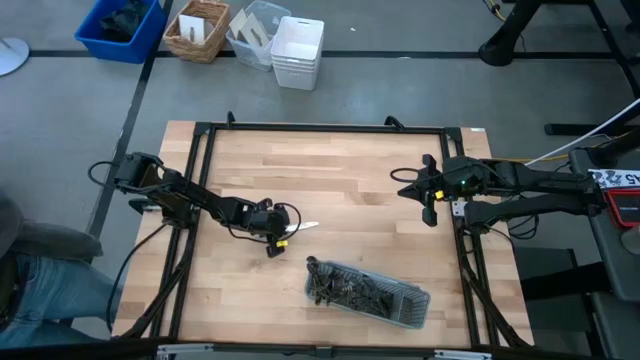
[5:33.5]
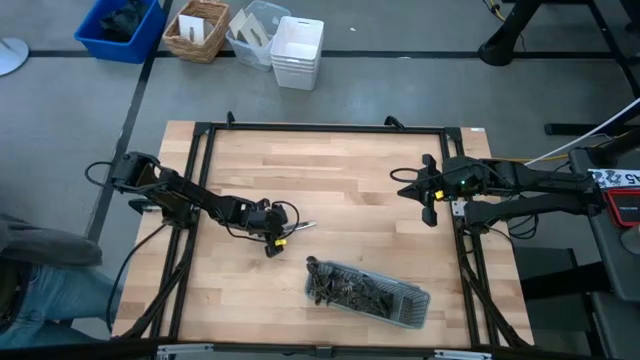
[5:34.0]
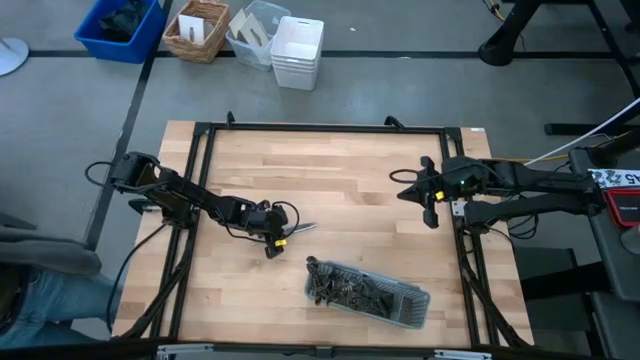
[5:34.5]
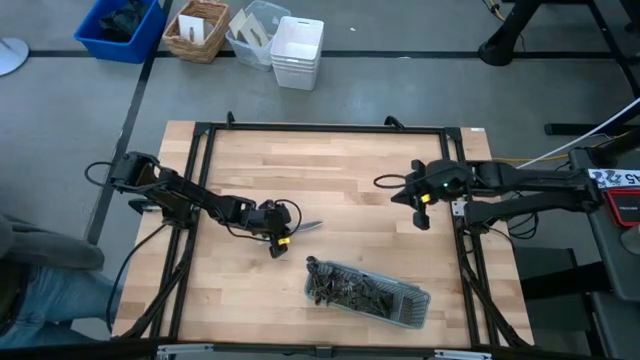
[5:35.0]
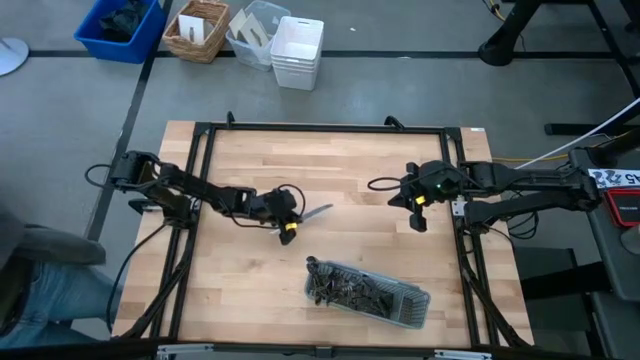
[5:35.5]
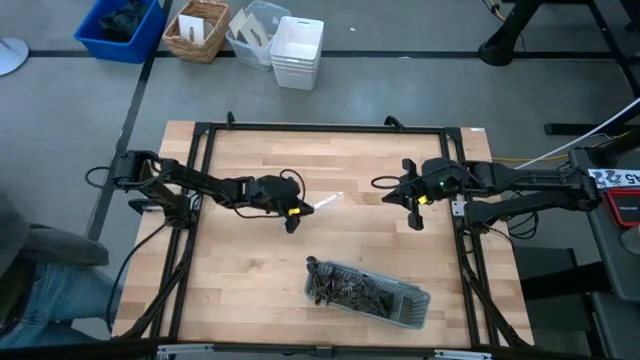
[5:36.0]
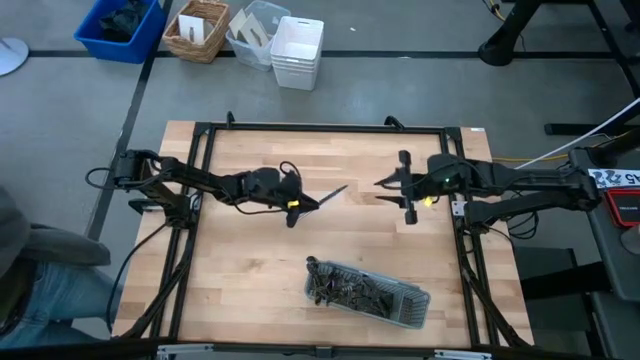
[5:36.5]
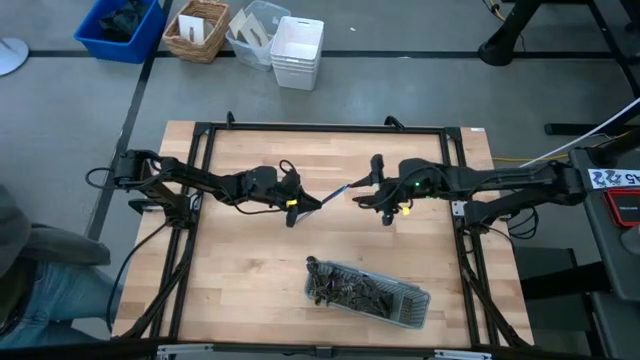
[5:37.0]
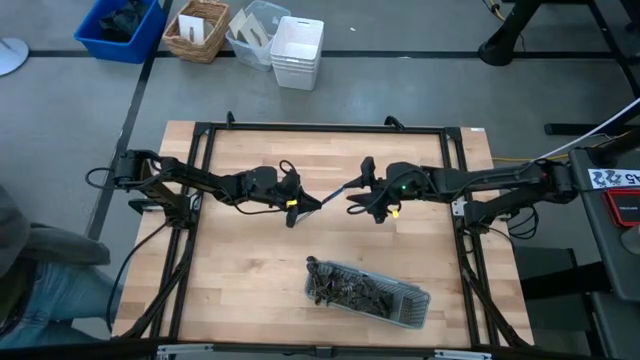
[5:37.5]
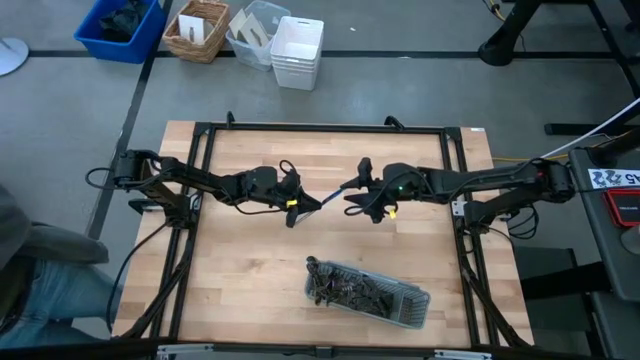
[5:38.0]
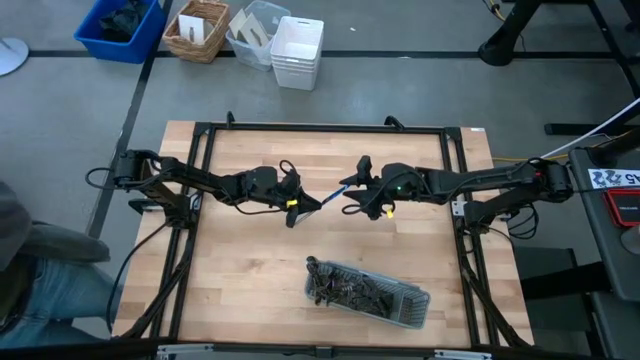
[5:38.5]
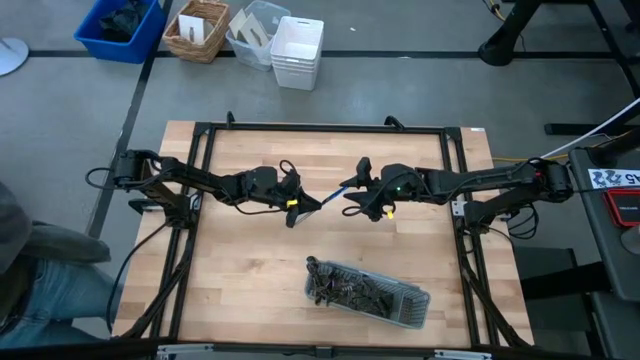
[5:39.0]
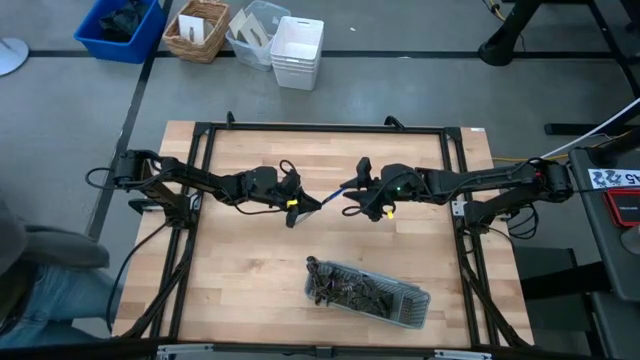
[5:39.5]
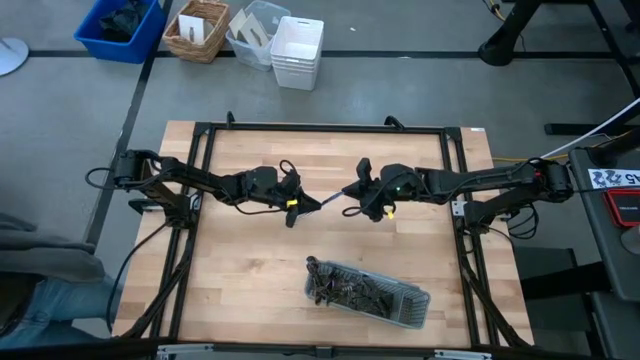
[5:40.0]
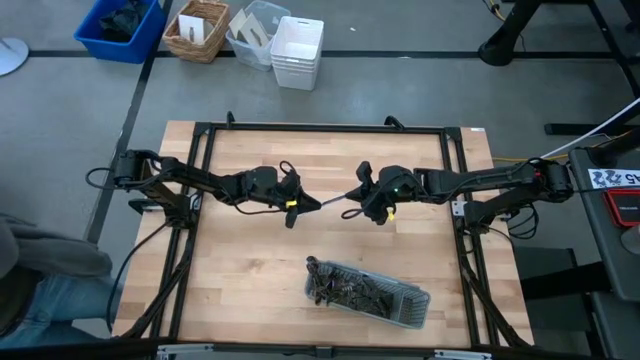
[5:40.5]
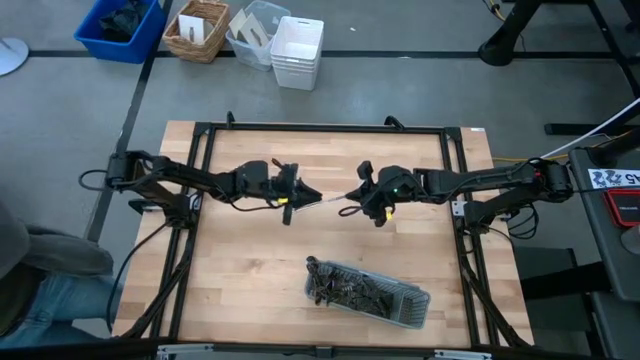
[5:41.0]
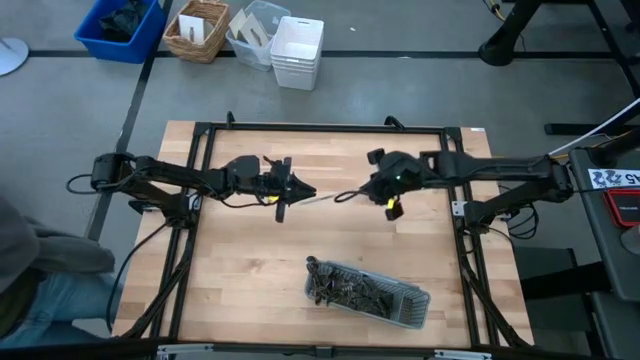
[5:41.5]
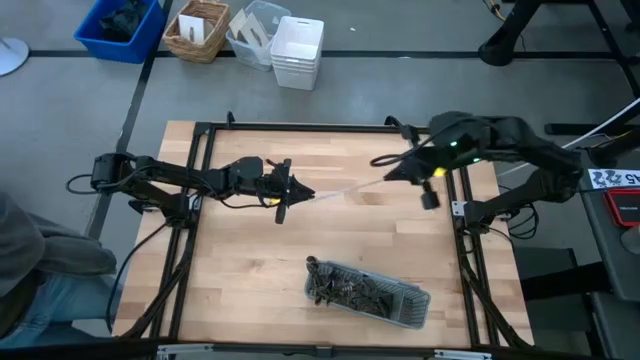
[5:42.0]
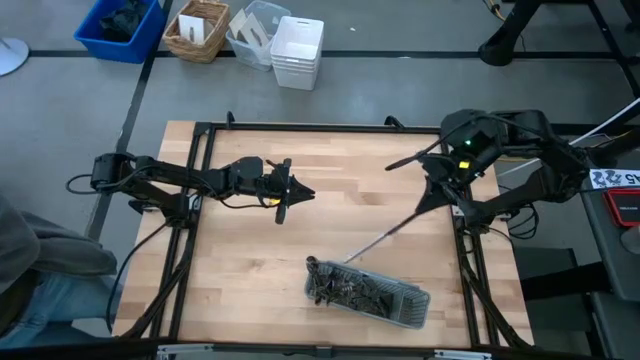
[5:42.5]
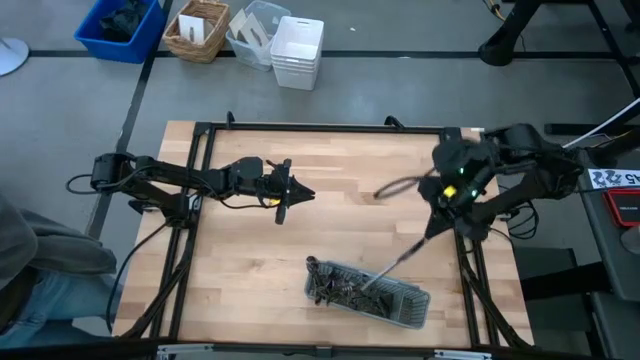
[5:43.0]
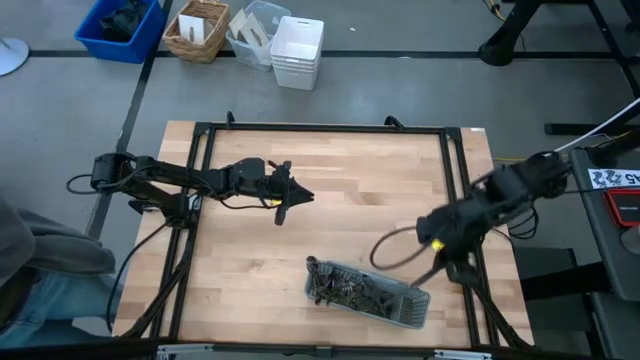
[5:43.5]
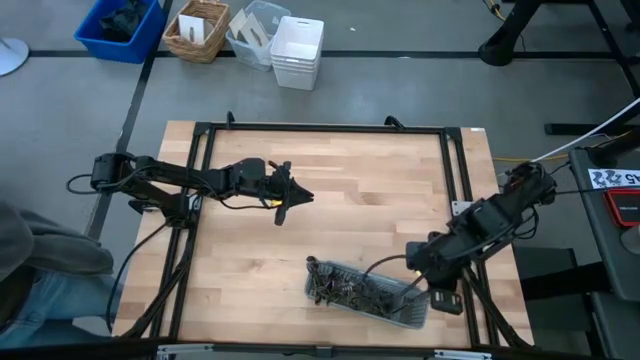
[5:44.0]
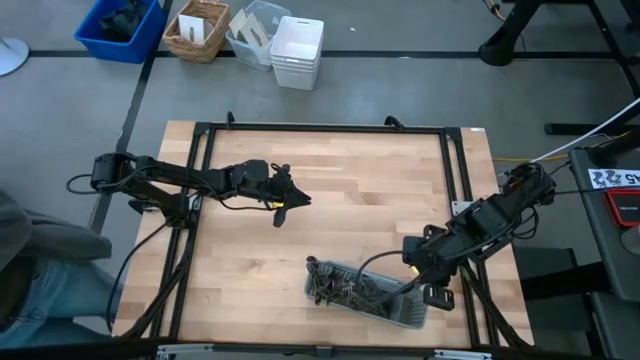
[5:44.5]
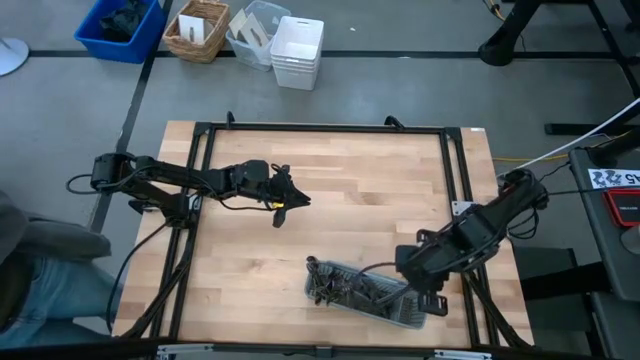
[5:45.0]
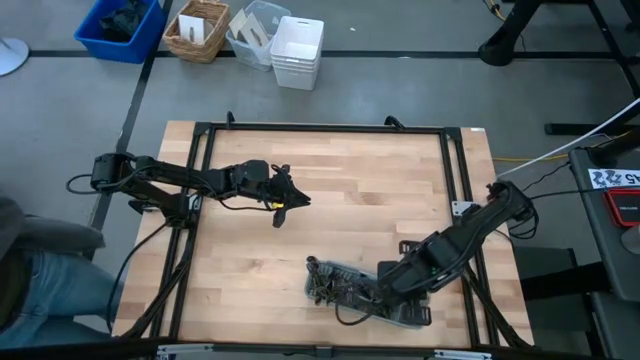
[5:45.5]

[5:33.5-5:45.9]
Task: Sort silverware
Put the knife into the gray silverware rack

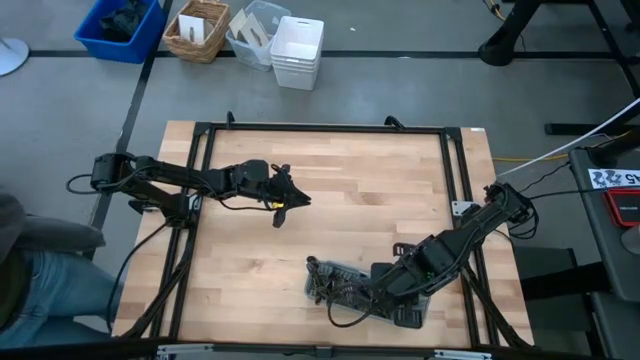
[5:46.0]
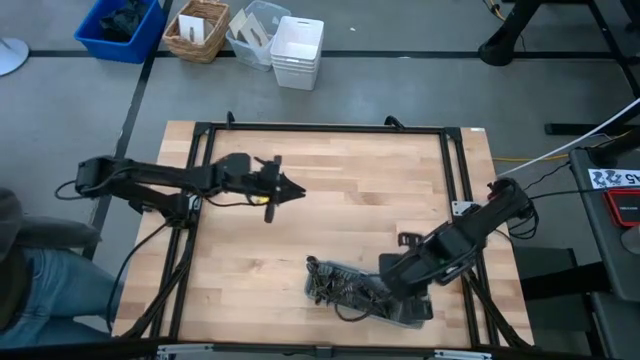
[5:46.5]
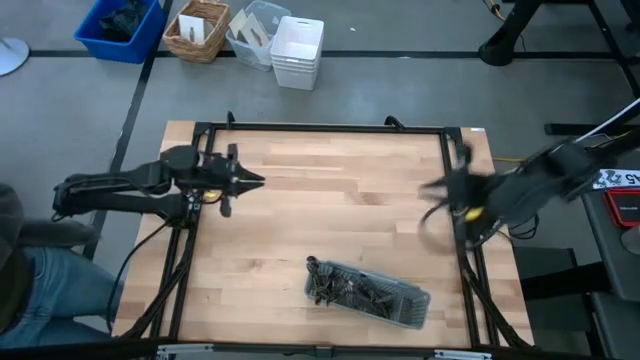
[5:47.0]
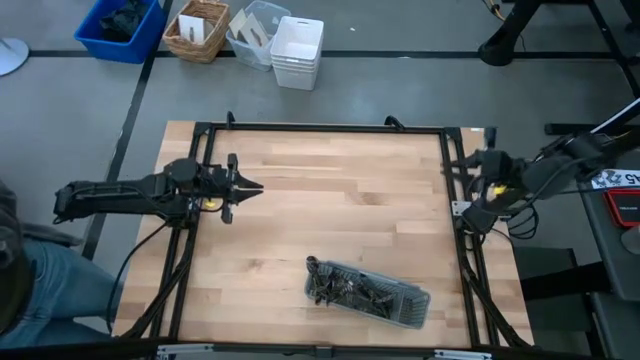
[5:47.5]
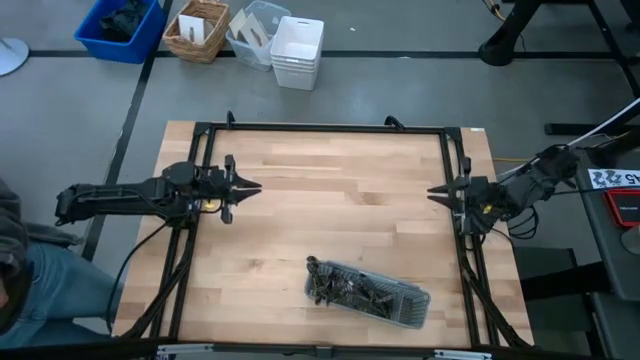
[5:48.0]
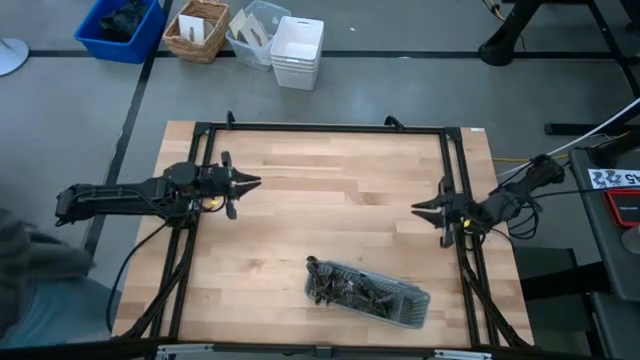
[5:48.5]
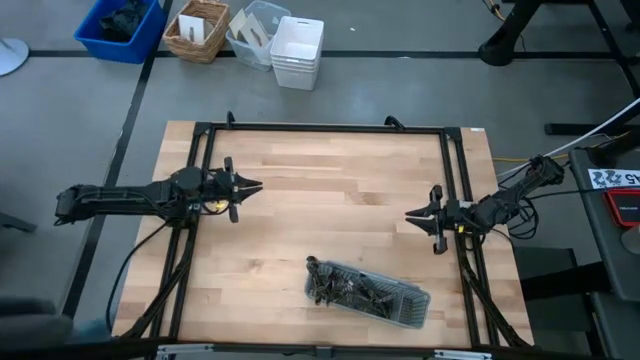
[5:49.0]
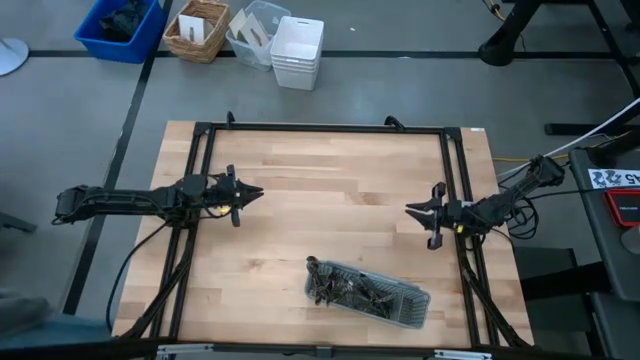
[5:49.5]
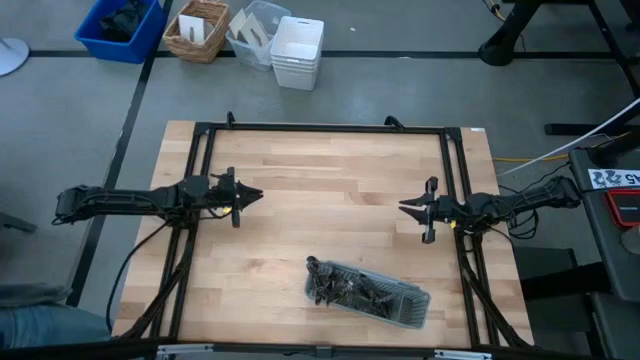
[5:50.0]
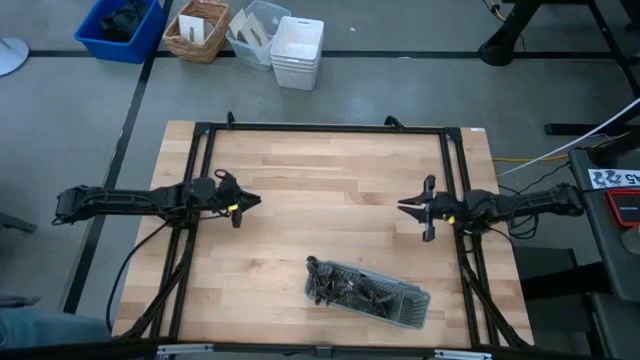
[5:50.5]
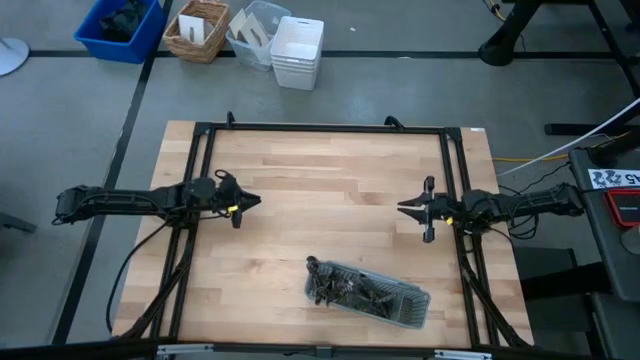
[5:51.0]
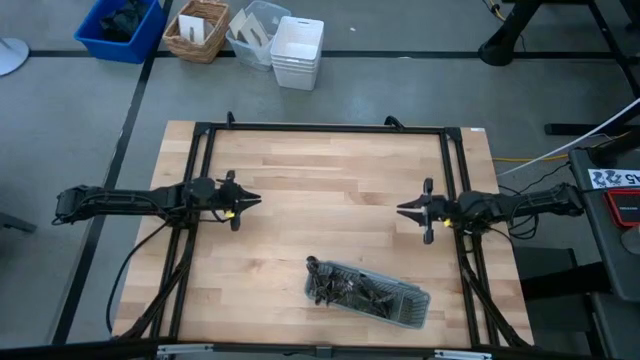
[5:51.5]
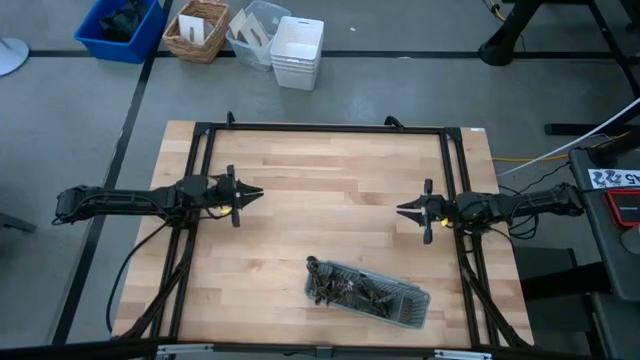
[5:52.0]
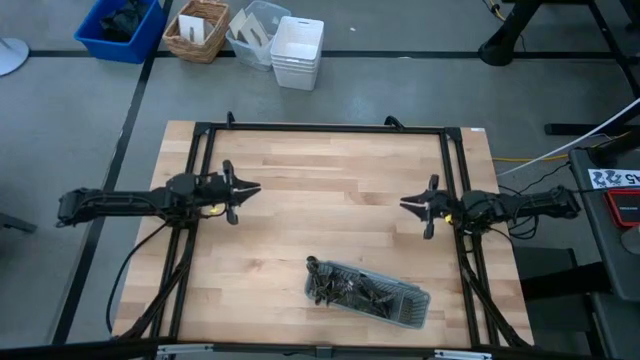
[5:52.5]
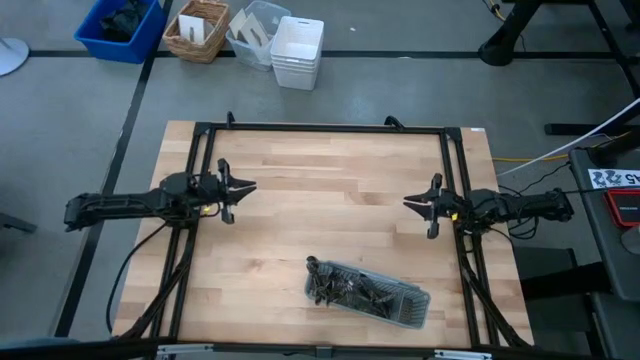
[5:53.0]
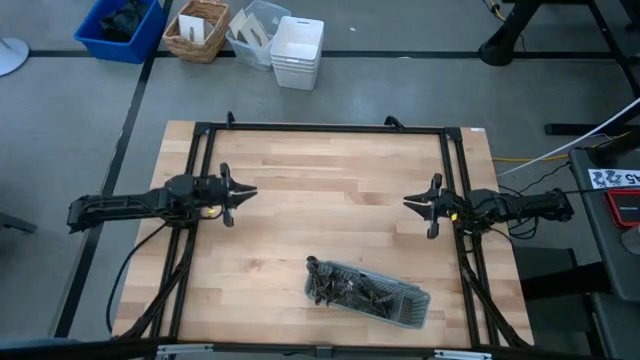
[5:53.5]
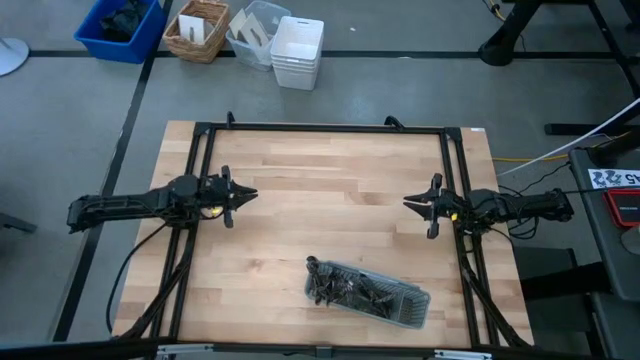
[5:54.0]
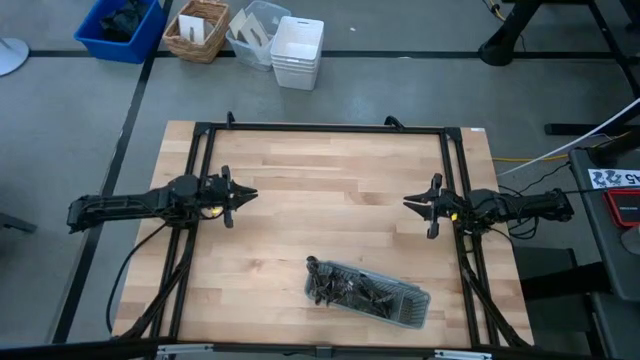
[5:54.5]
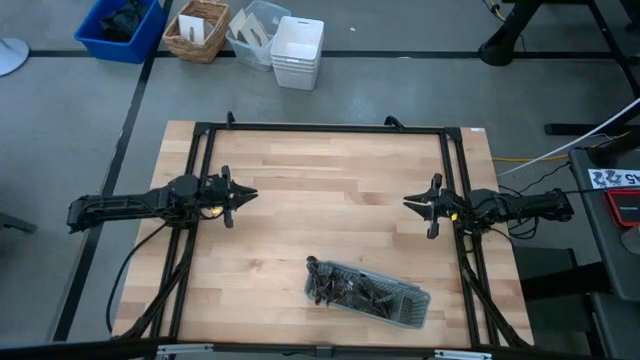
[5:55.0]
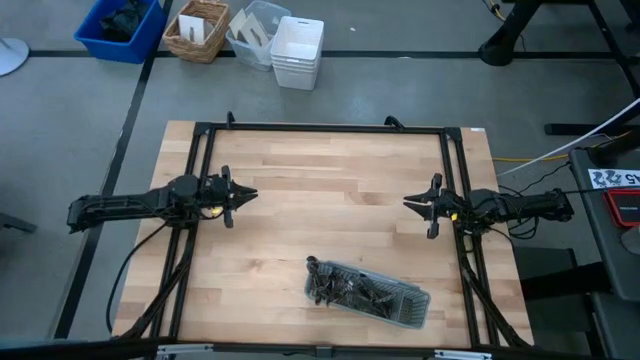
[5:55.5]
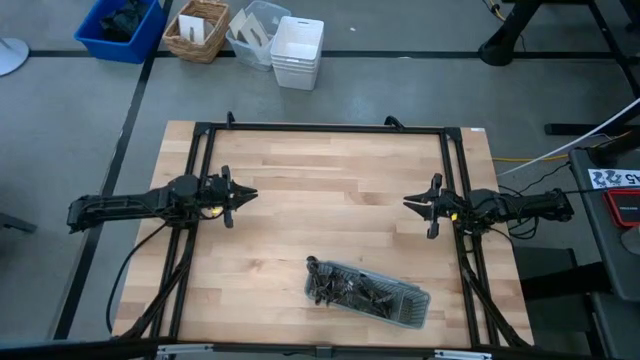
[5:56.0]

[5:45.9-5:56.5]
Return to Home Position
